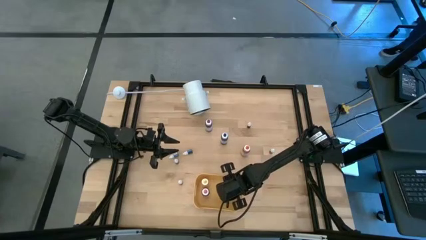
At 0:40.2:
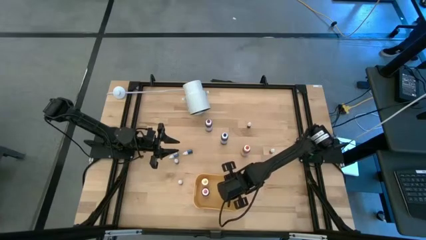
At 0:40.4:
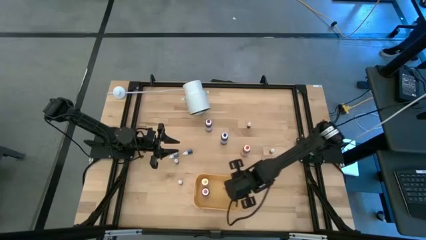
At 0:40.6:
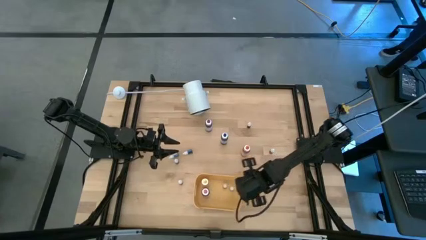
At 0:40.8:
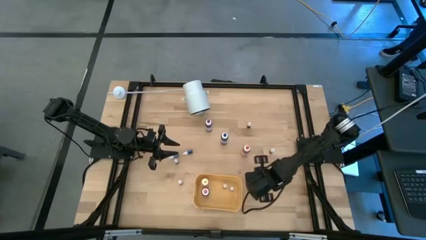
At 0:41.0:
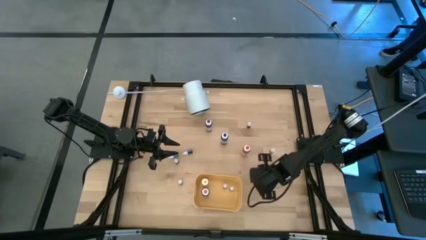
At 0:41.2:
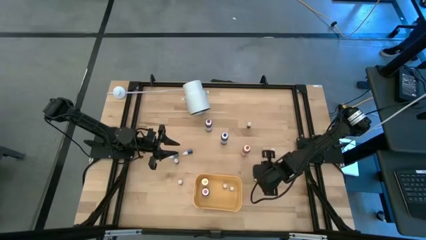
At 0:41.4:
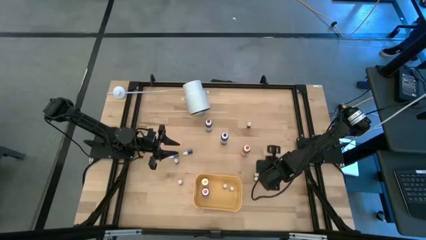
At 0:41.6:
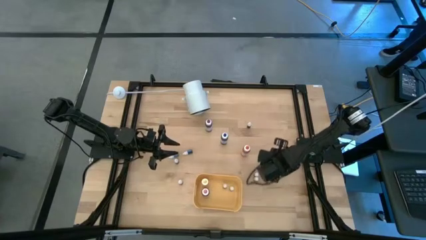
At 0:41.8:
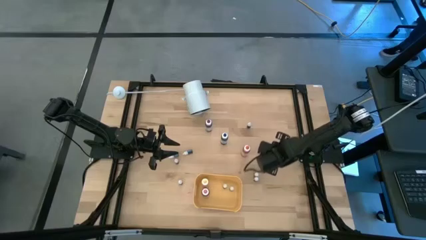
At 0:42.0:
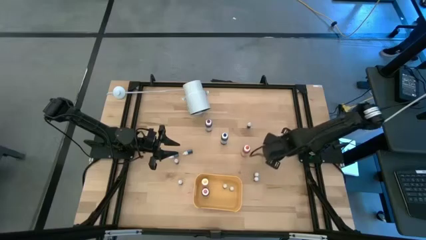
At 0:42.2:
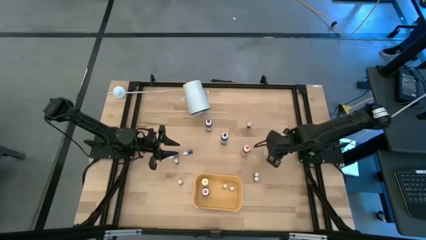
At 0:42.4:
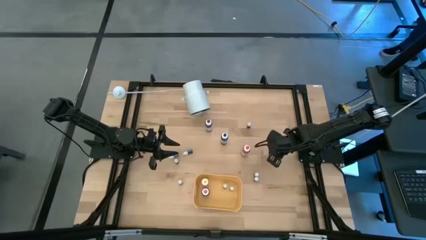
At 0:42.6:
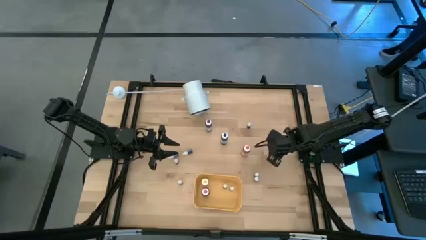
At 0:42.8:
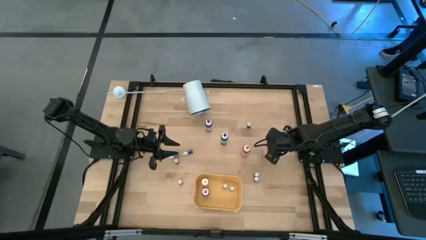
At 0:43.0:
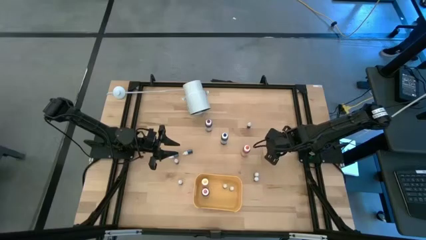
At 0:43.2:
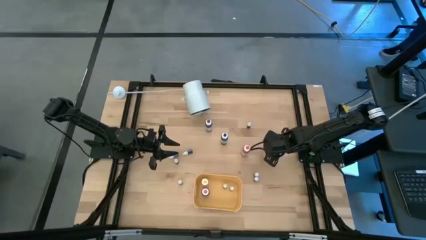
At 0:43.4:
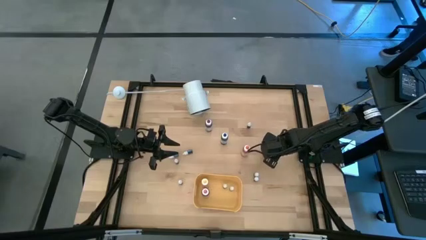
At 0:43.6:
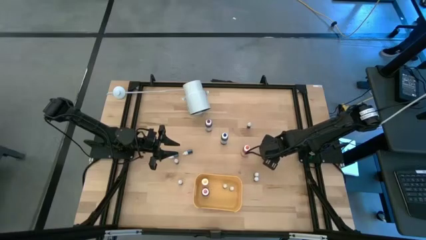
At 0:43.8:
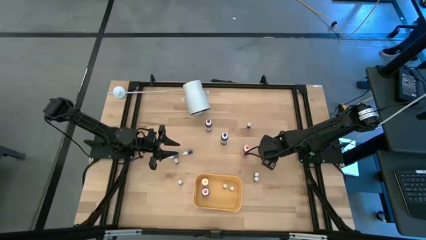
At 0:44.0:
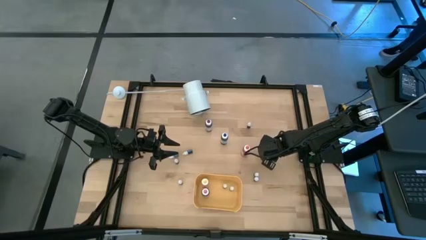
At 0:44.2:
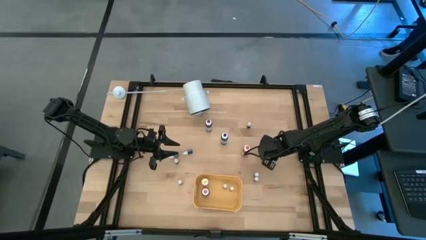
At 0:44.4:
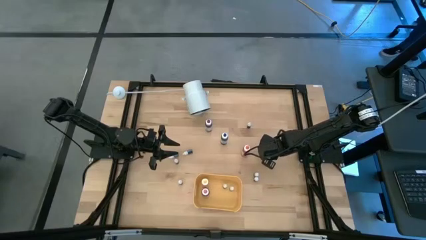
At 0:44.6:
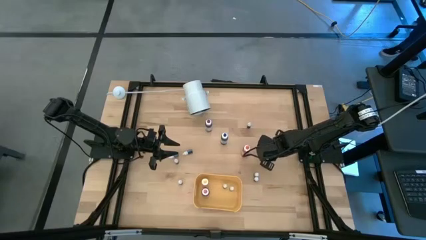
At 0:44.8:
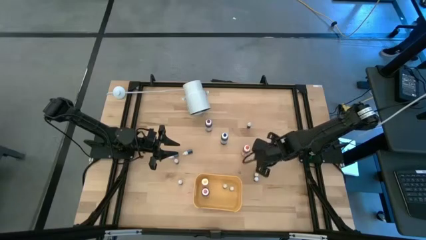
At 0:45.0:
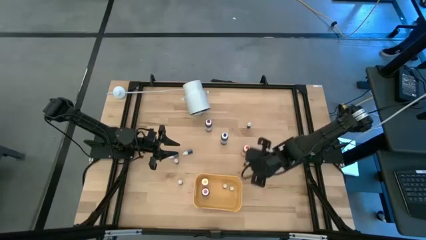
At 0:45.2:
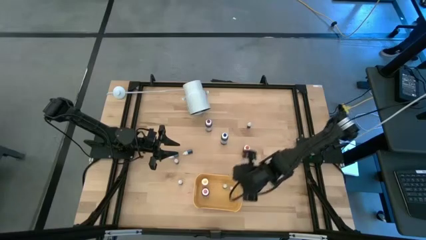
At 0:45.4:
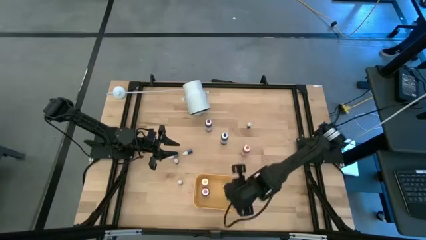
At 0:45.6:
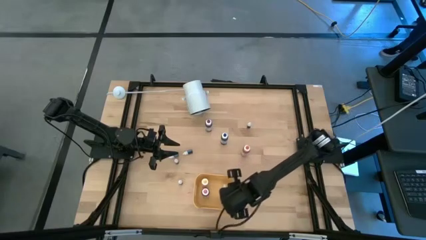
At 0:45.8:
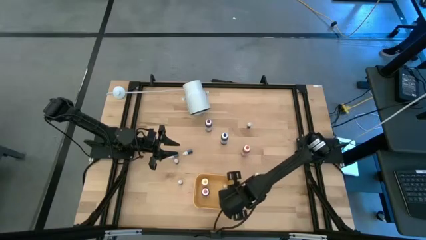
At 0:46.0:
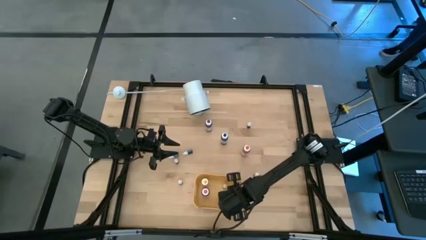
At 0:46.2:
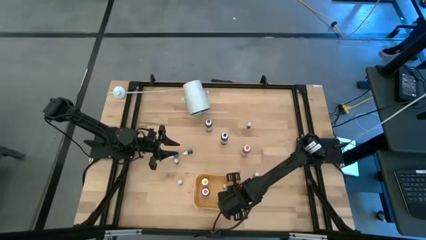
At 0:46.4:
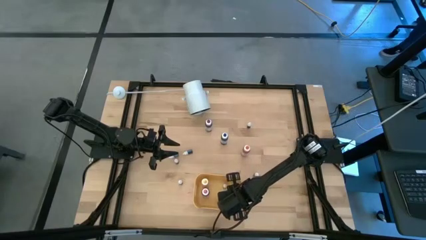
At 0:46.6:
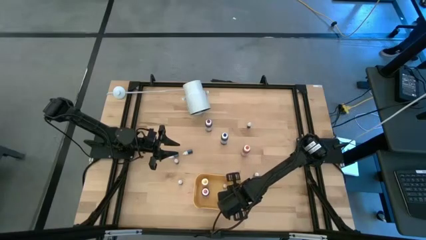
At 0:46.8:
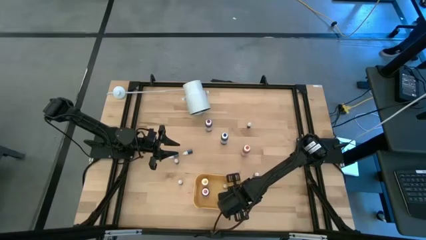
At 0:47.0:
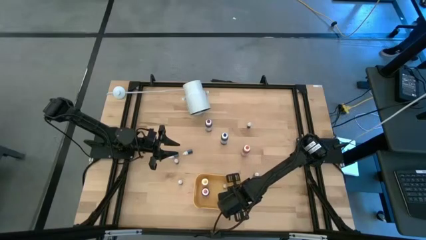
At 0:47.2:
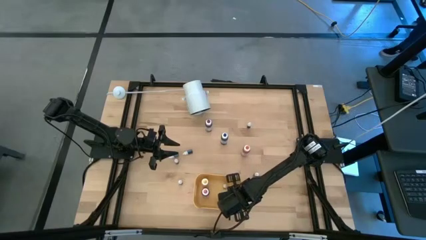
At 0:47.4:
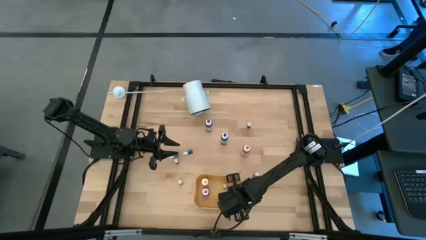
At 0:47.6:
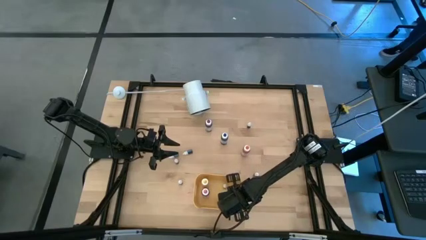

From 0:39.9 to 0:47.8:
Task: Pick & Place food coloring
Put the top right small red food coloring bottle into the yellow bin

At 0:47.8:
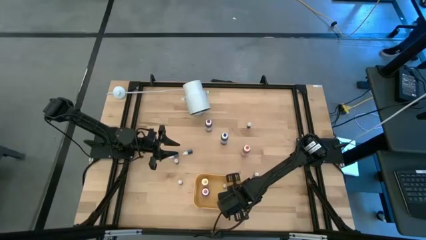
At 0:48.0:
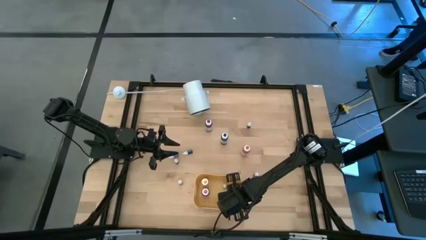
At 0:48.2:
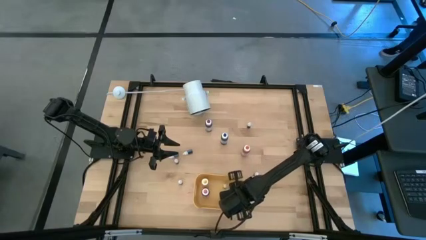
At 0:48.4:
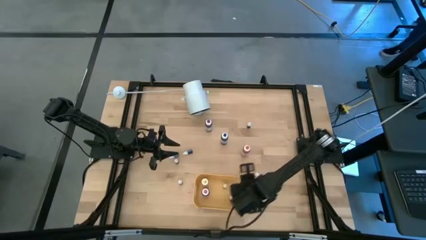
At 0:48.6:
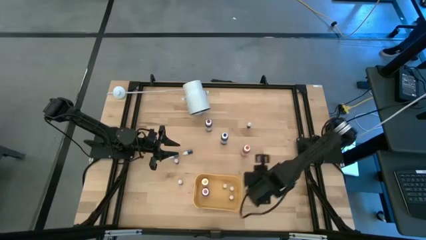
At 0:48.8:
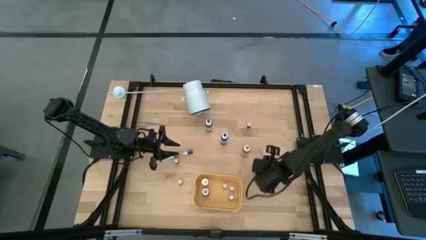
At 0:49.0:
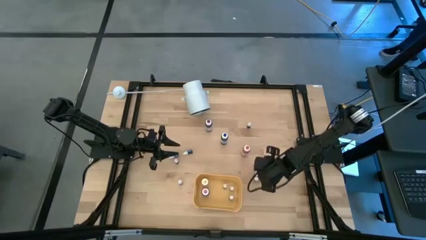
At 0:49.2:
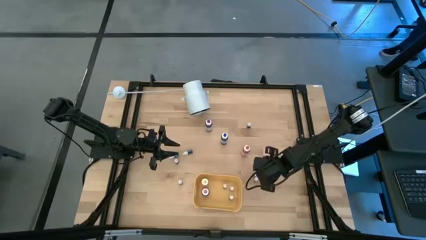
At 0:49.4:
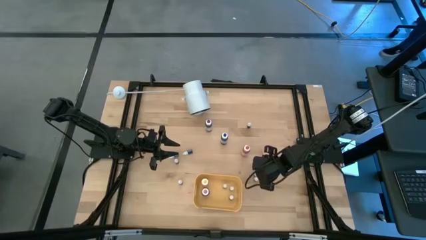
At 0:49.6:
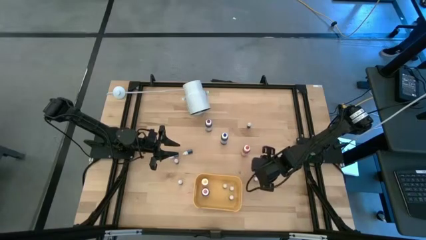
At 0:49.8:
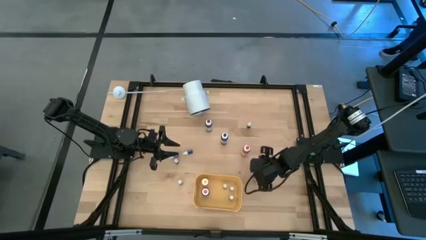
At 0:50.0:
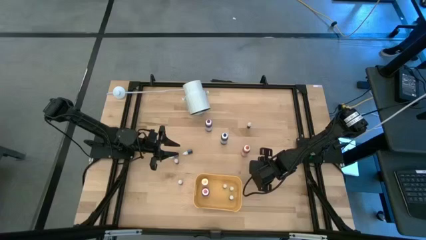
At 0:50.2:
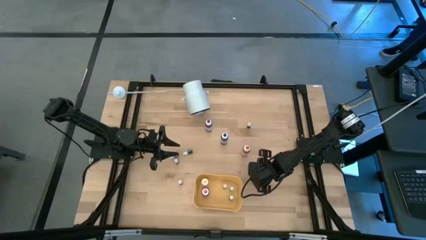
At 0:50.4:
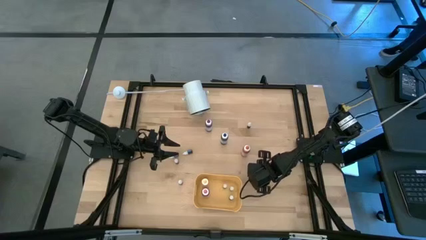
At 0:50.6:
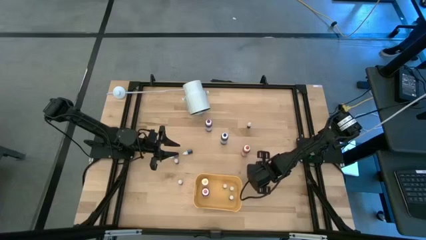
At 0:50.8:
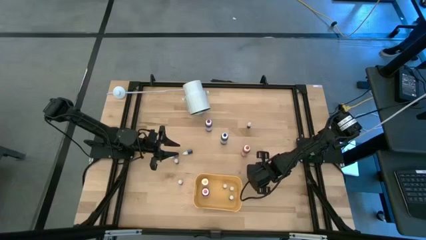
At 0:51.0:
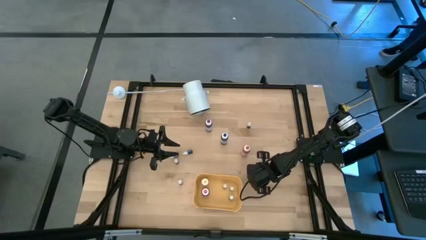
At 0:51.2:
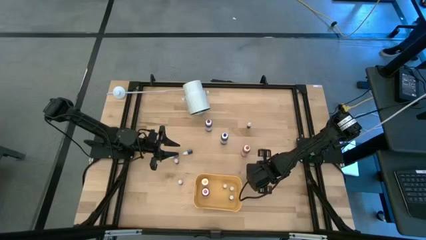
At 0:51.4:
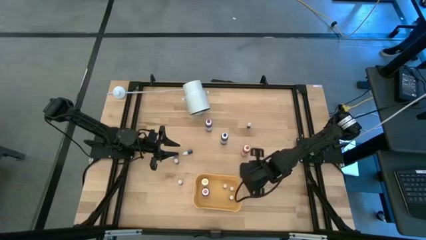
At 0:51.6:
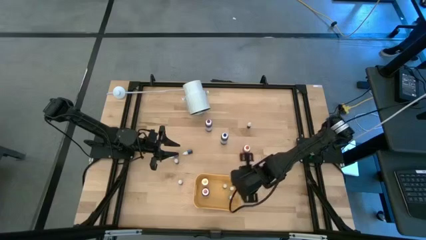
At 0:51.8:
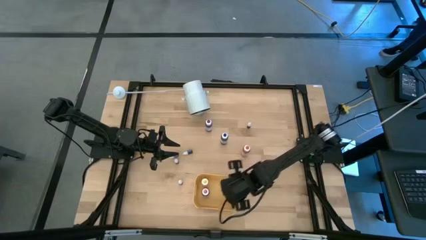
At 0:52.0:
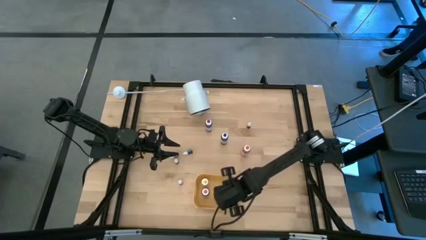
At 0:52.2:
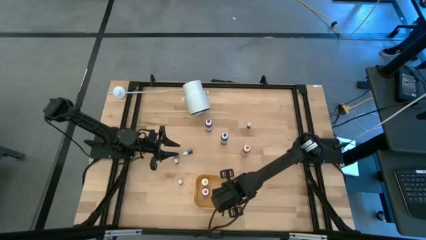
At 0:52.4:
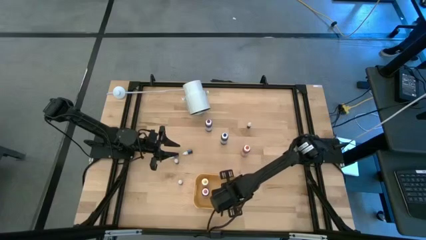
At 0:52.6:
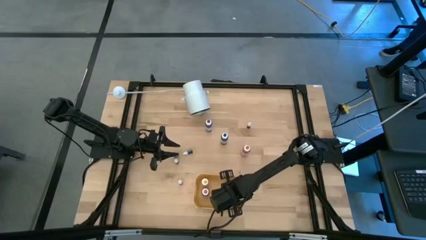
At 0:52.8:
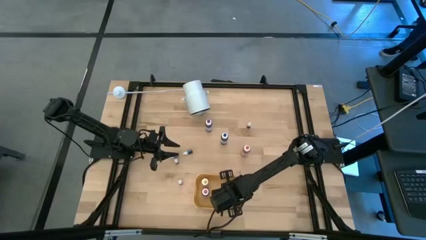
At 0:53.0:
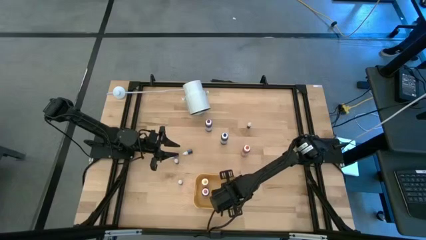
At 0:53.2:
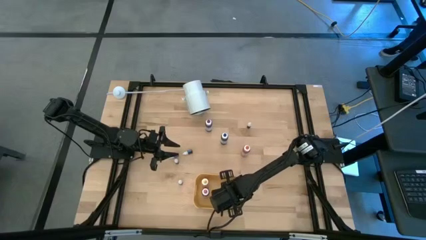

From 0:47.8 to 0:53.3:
Put the right small red food coloring bottle into the yellow bin

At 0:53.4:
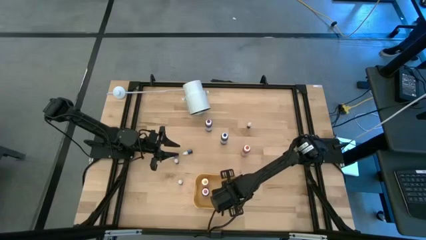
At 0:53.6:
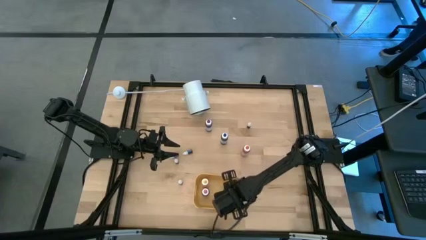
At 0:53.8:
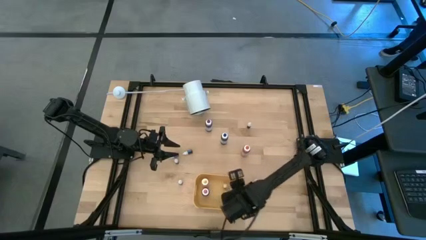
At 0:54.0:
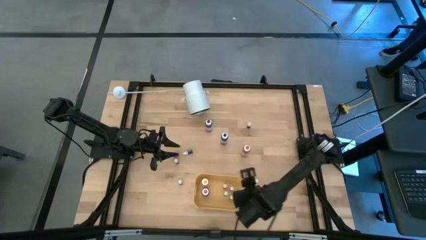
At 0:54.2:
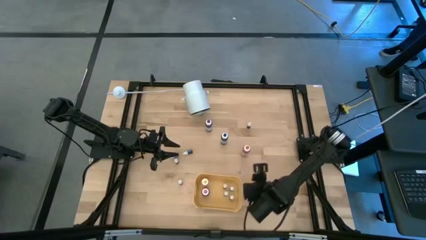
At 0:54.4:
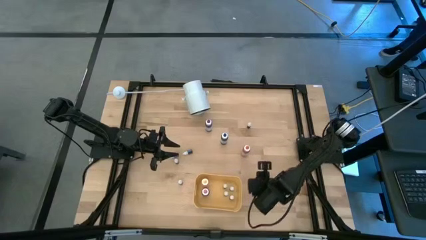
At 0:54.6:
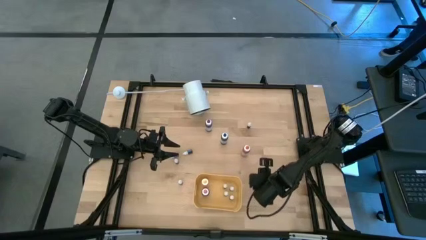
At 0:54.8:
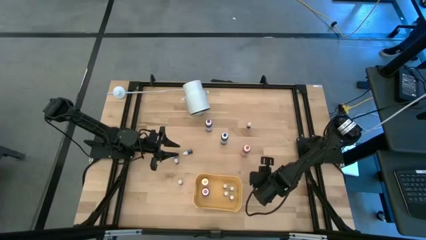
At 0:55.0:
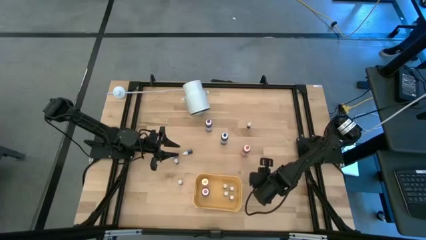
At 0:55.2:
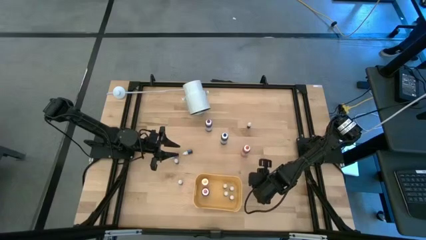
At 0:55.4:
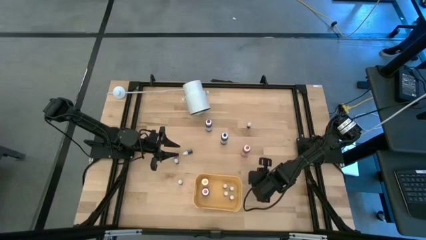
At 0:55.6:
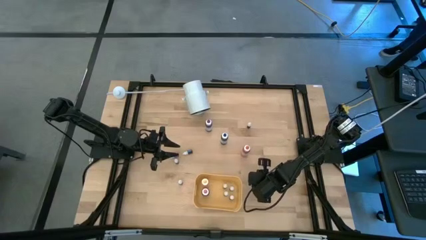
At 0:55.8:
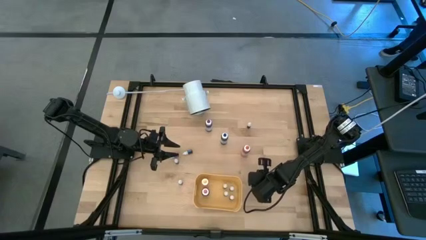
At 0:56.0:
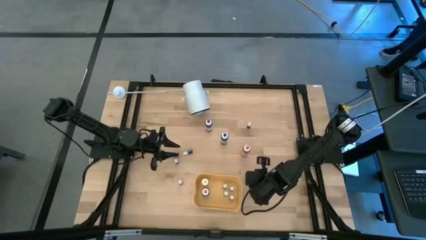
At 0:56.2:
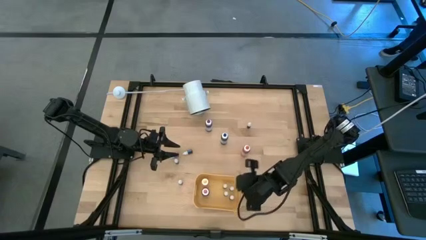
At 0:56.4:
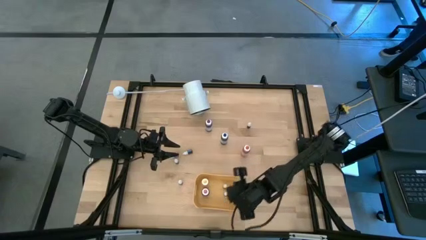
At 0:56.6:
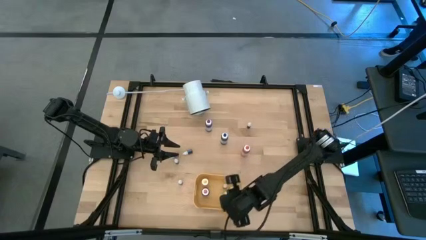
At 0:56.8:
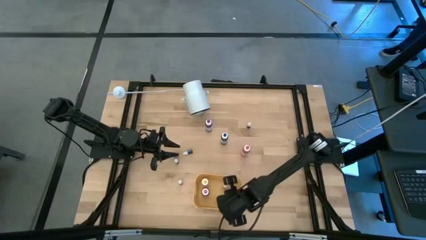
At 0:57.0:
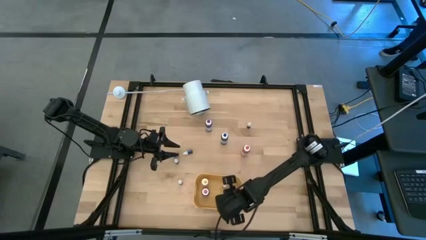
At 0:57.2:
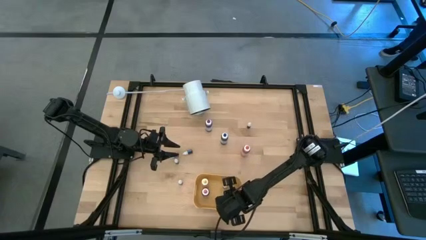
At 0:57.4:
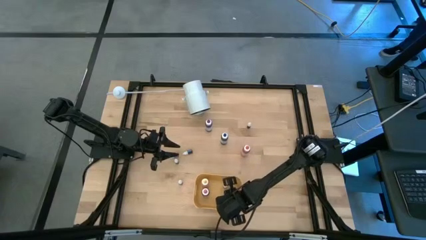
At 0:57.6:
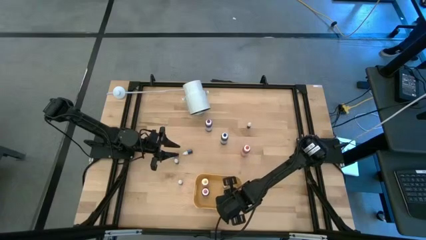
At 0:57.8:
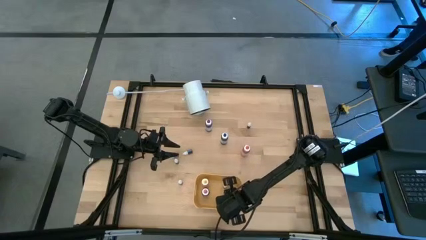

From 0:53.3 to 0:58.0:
Put the right small purple food coloring bottle into the yellow bin
